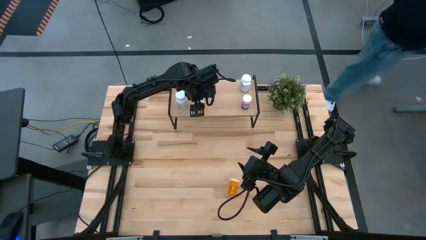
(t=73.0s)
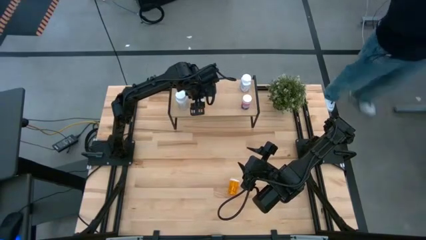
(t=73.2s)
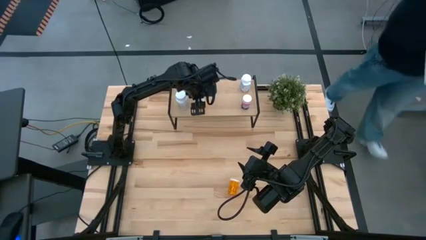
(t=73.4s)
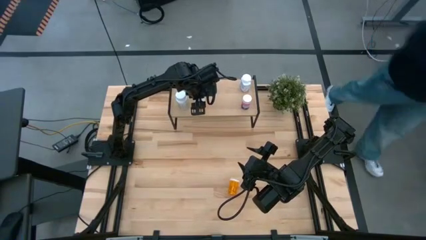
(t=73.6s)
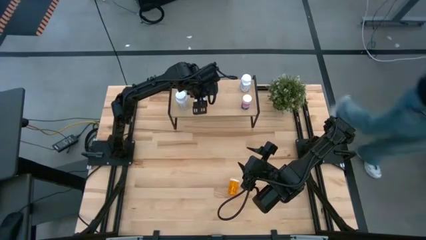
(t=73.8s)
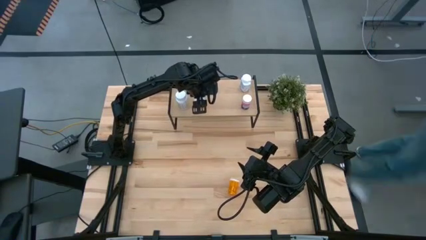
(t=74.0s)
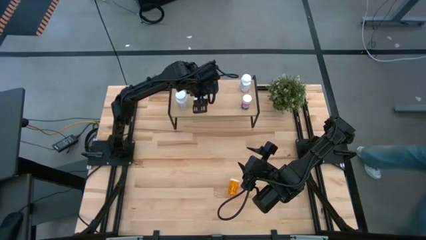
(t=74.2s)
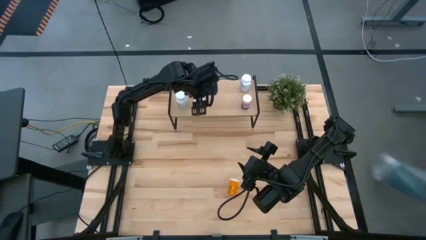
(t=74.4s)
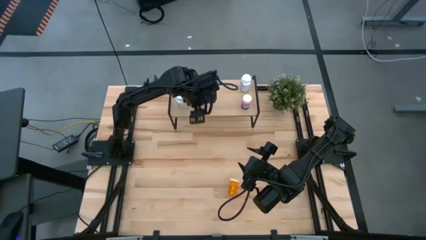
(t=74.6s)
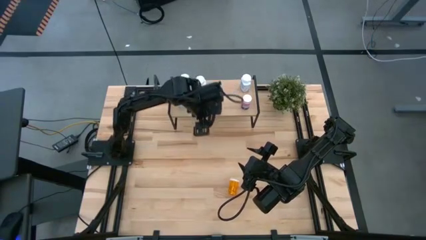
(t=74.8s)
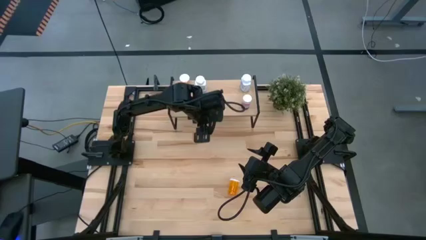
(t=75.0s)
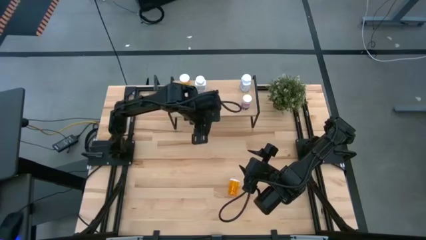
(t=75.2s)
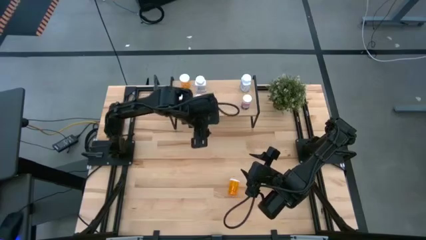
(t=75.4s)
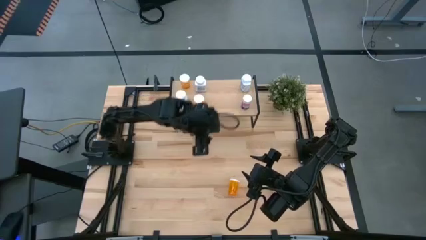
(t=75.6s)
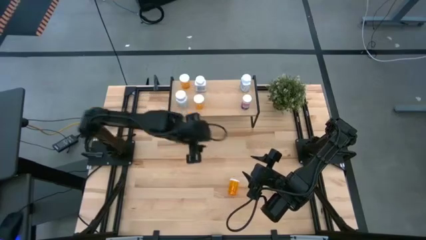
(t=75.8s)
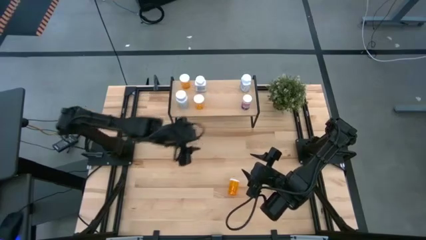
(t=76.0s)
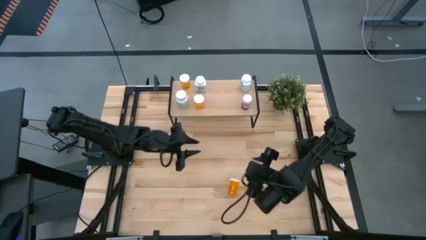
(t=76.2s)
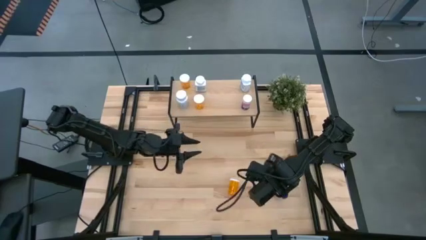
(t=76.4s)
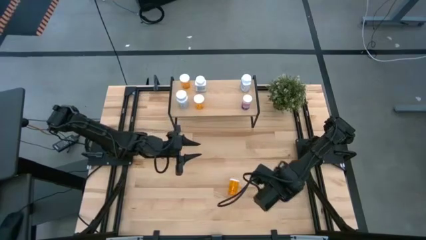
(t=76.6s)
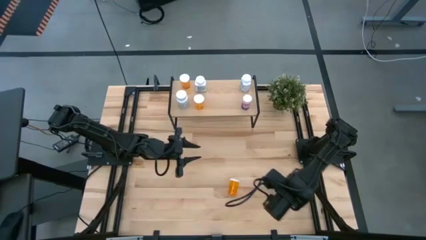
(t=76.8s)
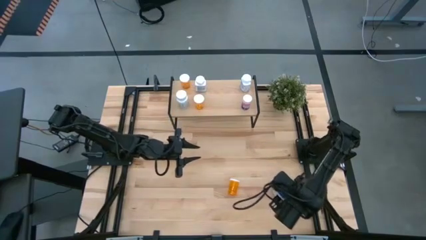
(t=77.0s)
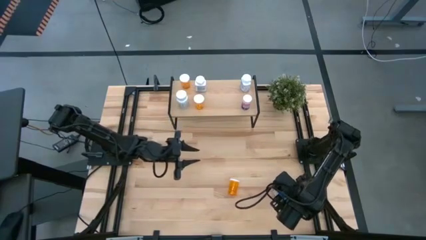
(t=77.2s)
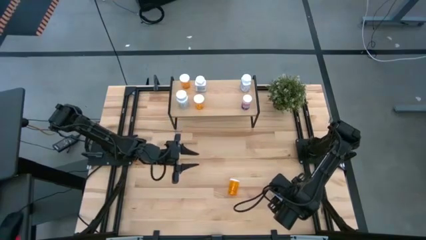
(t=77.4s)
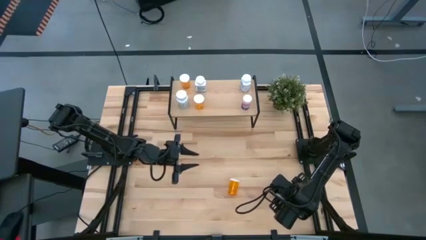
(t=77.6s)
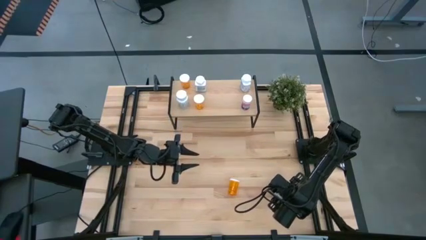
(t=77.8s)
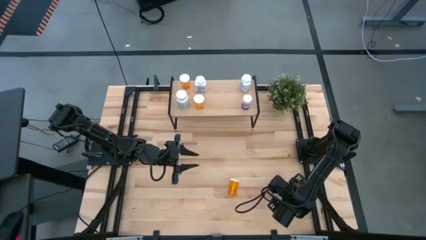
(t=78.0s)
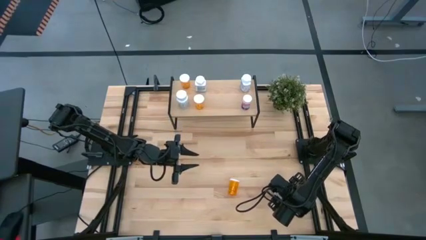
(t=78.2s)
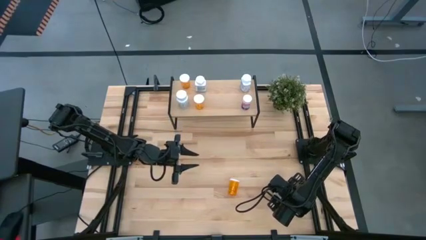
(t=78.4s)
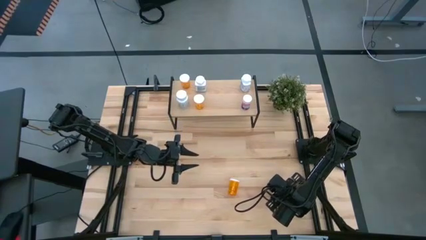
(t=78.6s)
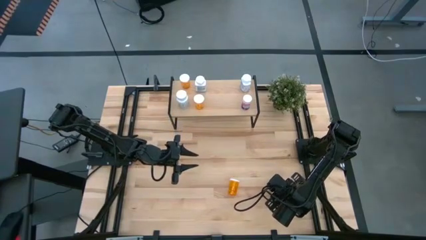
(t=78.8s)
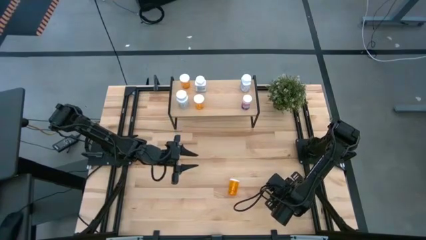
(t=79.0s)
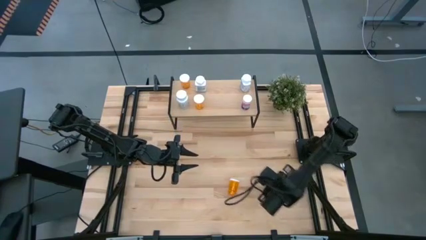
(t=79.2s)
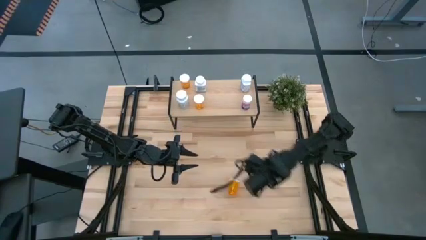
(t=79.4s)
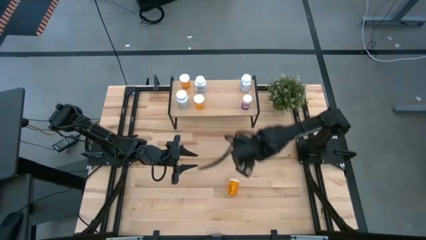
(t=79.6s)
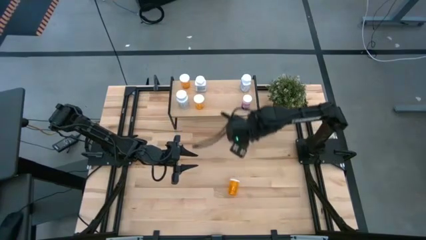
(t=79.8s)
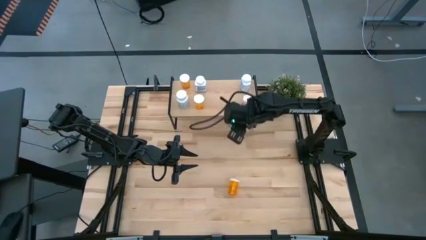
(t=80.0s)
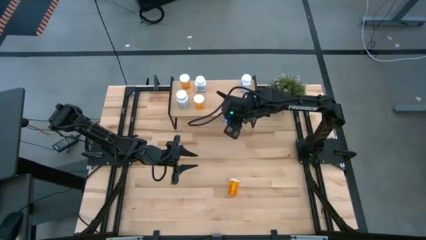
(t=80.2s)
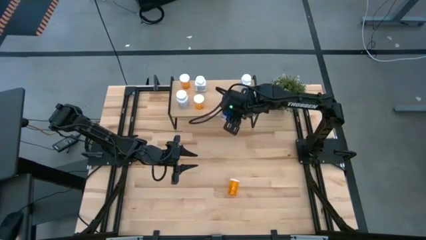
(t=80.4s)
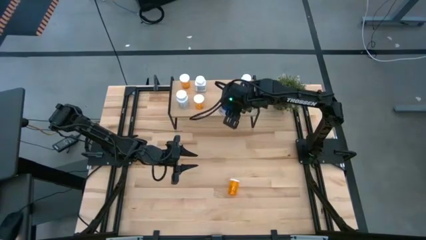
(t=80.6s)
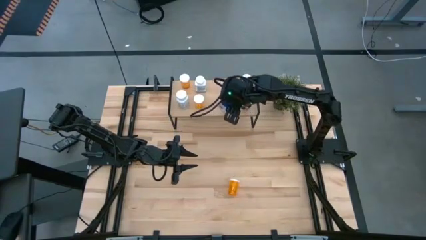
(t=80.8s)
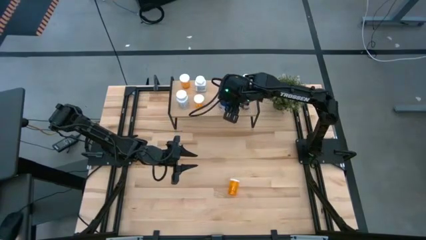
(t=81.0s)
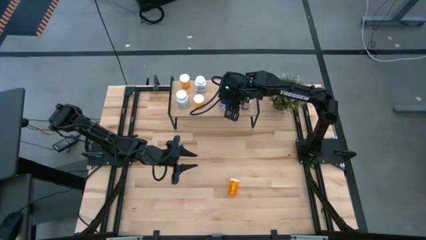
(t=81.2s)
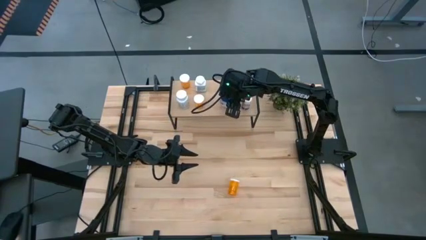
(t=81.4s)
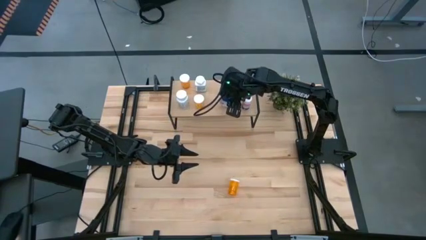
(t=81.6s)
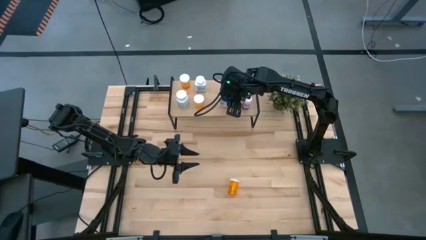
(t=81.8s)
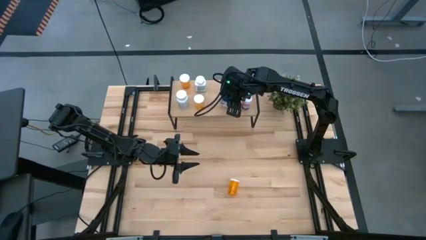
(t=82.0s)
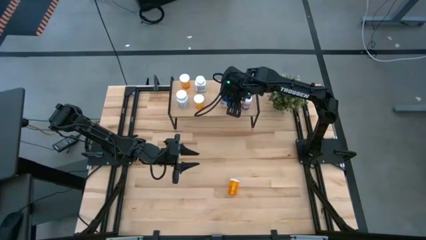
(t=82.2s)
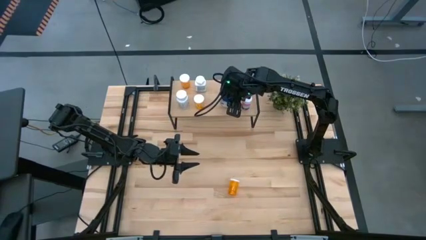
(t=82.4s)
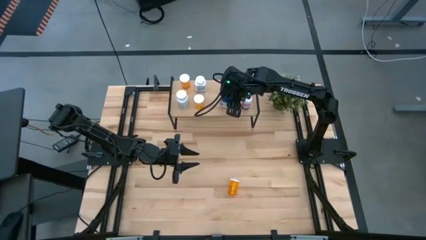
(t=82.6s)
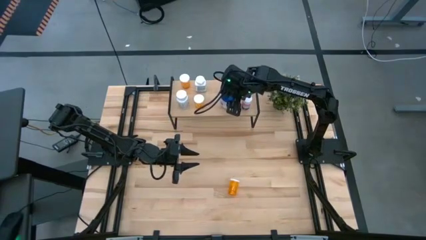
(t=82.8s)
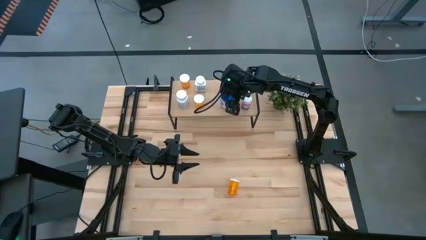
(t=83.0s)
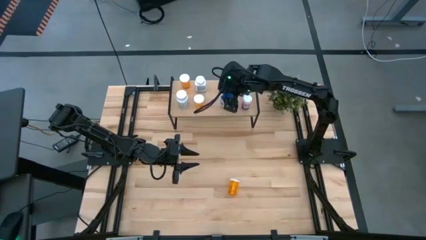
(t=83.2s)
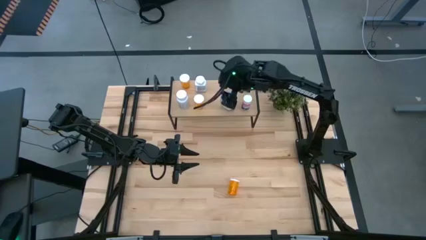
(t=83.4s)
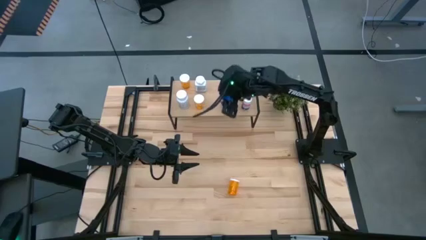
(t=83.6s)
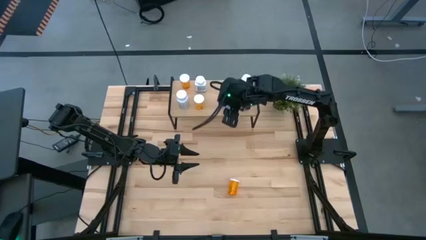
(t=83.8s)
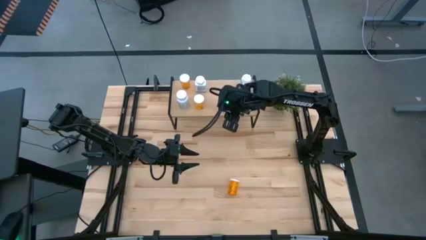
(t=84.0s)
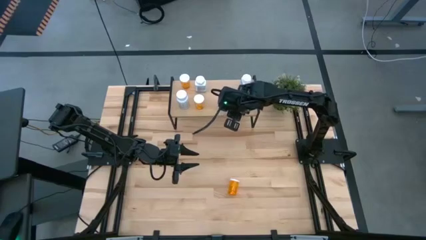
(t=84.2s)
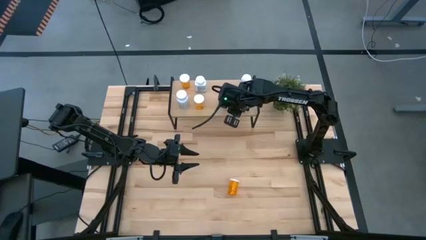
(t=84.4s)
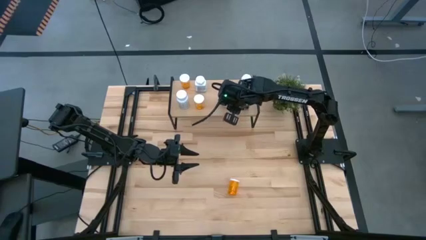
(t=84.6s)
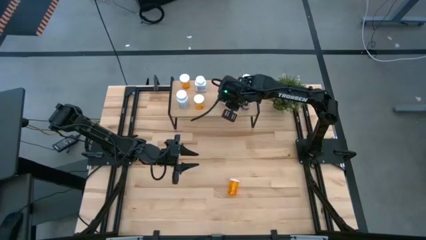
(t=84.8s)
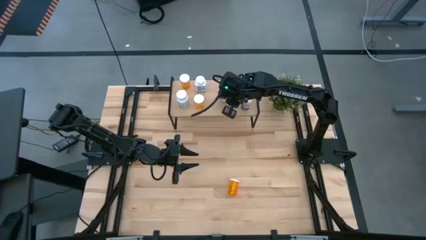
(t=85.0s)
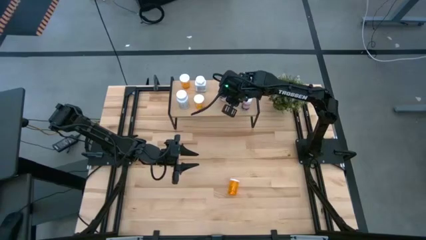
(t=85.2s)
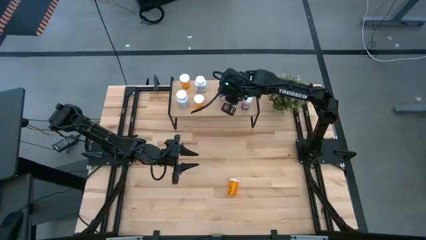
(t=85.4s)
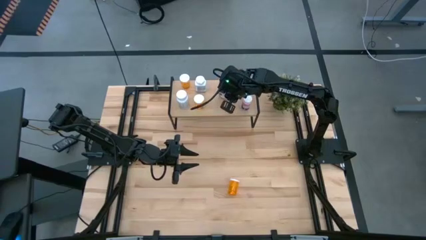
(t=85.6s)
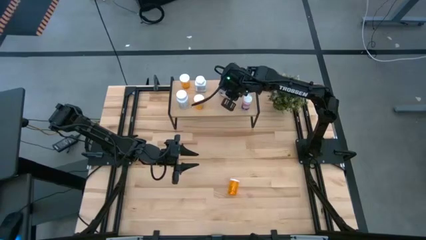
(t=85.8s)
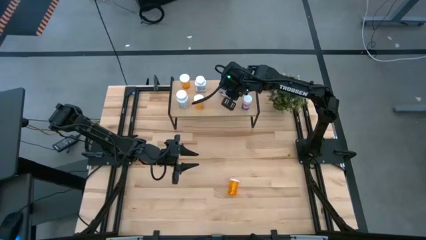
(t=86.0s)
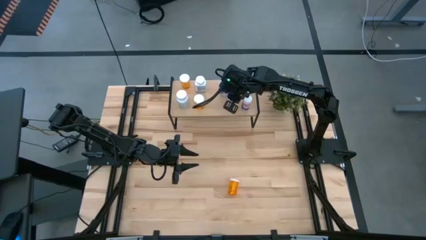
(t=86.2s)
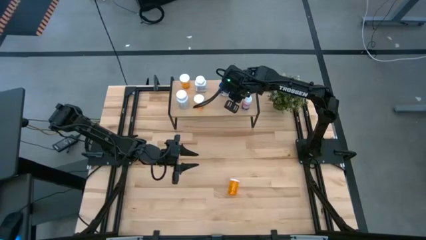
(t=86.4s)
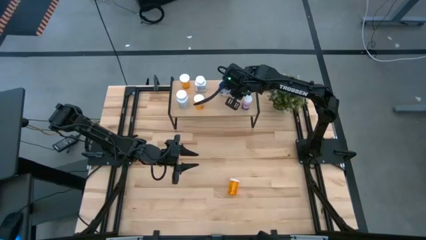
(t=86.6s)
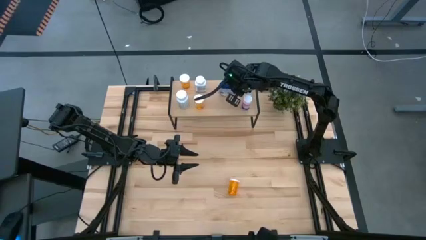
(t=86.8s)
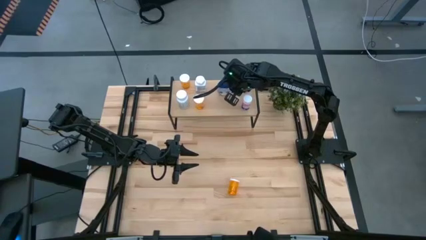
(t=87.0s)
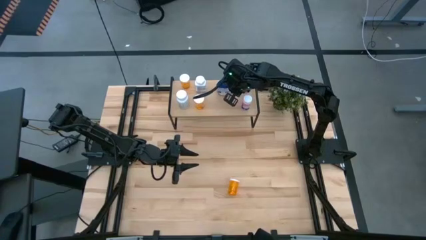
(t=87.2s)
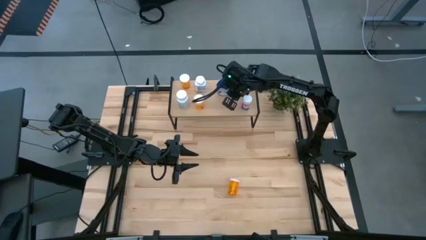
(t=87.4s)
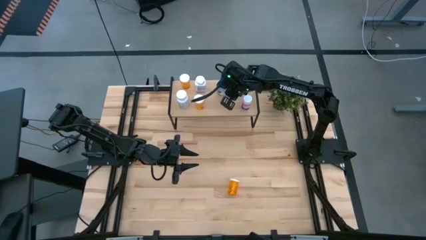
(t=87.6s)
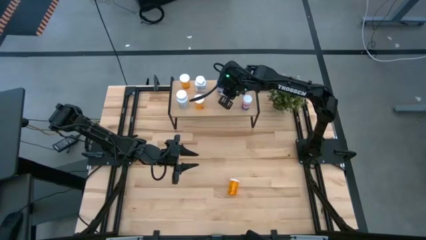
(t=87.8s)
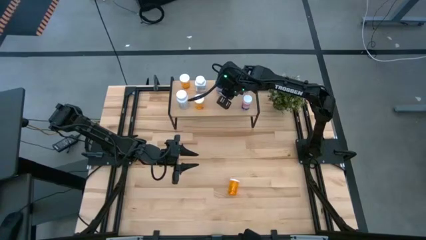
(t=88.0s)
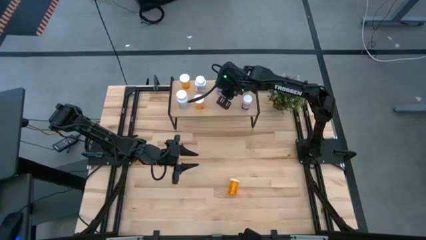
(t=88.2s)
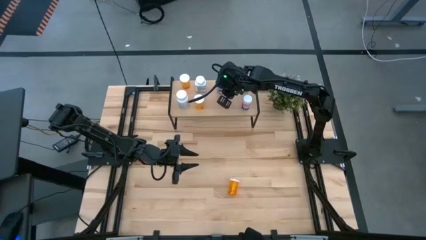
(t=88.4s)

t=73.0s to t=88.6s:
Task: Pick and place medicine bottles onto shelf by color
Put the blue pill bottle on the shelf
